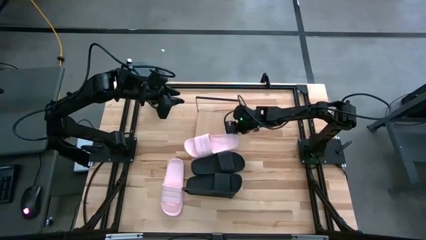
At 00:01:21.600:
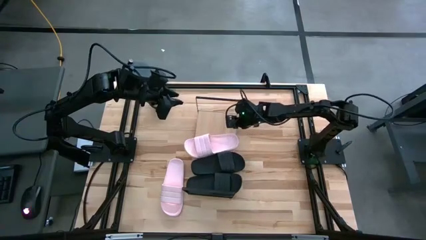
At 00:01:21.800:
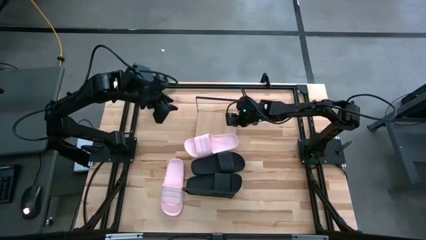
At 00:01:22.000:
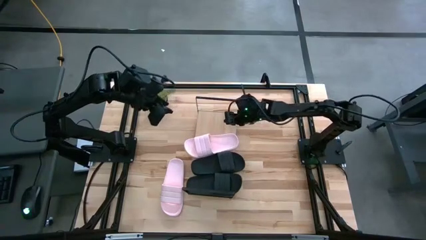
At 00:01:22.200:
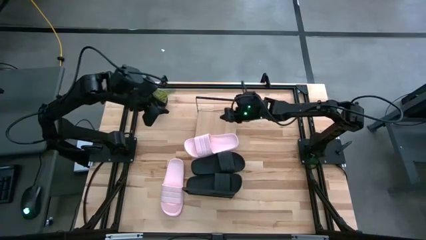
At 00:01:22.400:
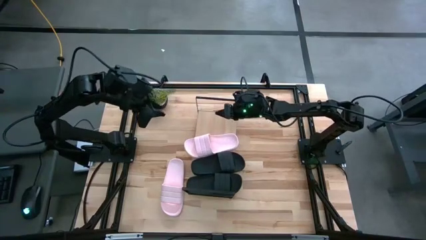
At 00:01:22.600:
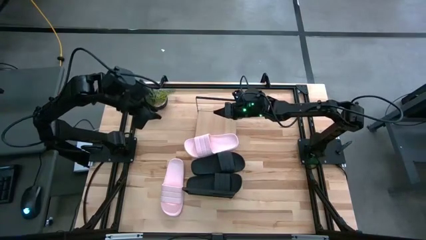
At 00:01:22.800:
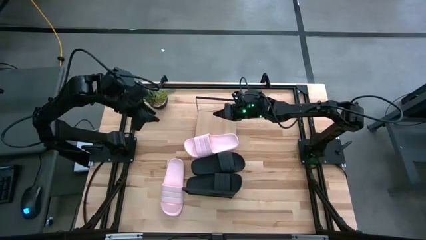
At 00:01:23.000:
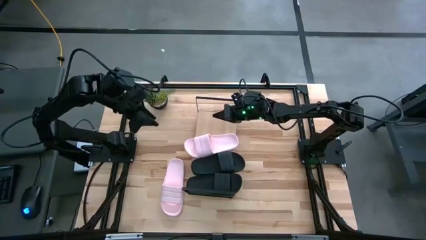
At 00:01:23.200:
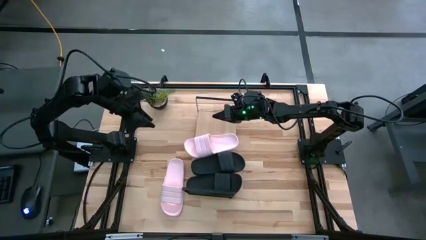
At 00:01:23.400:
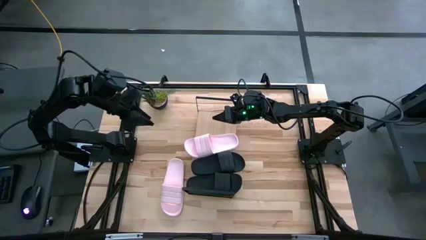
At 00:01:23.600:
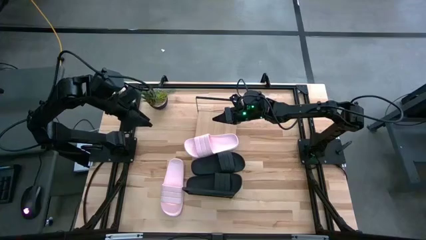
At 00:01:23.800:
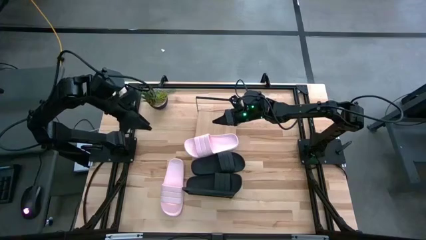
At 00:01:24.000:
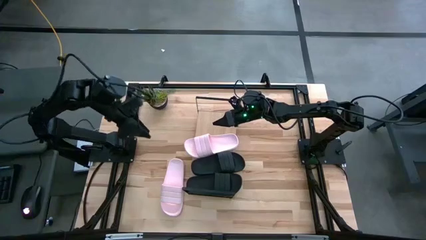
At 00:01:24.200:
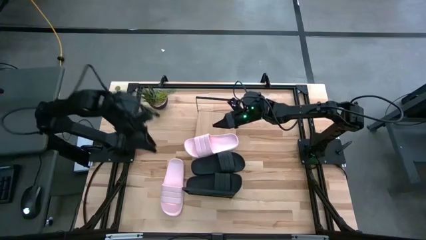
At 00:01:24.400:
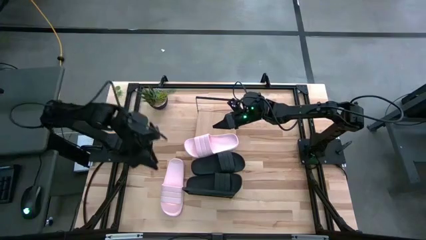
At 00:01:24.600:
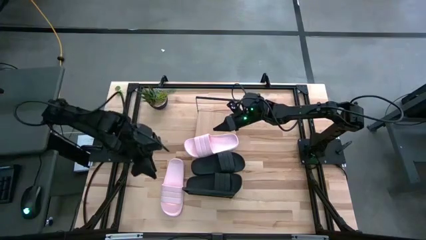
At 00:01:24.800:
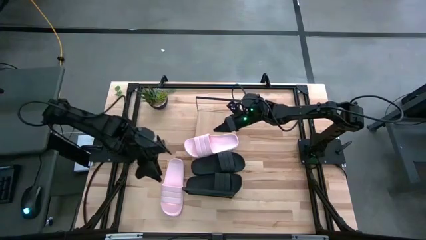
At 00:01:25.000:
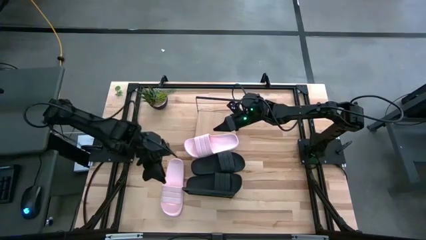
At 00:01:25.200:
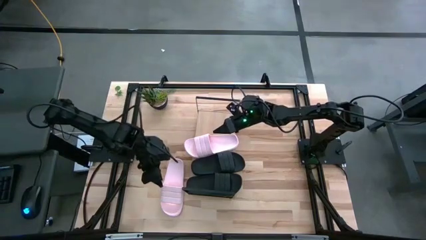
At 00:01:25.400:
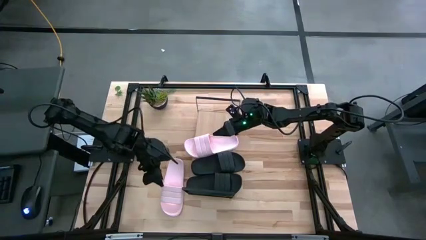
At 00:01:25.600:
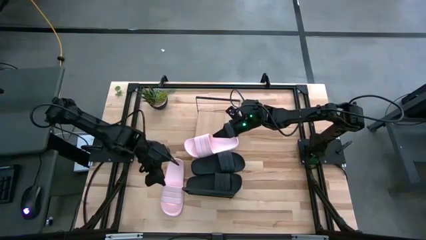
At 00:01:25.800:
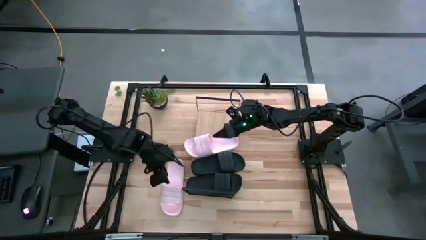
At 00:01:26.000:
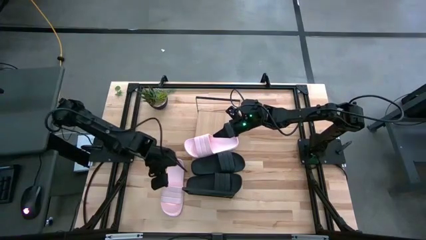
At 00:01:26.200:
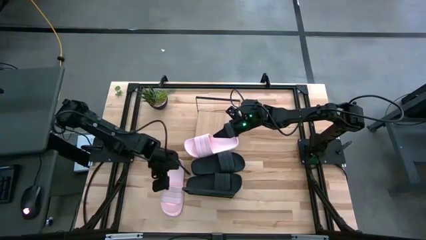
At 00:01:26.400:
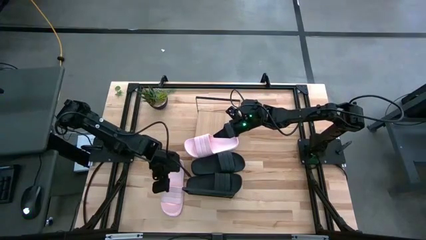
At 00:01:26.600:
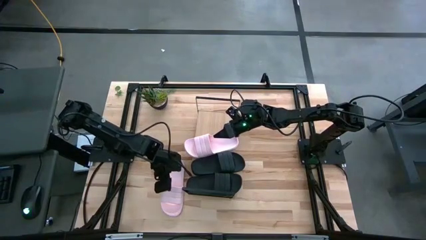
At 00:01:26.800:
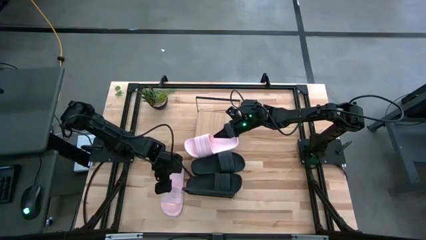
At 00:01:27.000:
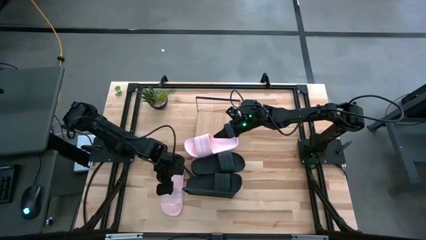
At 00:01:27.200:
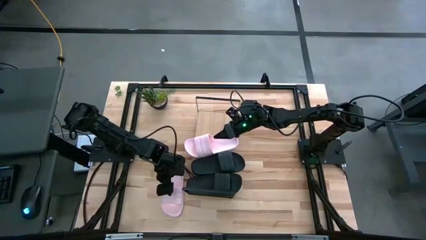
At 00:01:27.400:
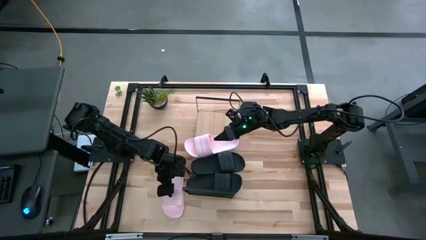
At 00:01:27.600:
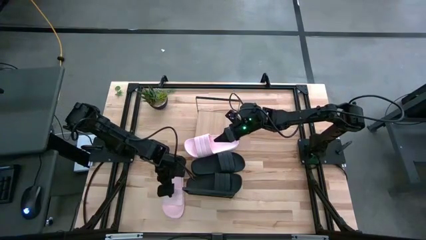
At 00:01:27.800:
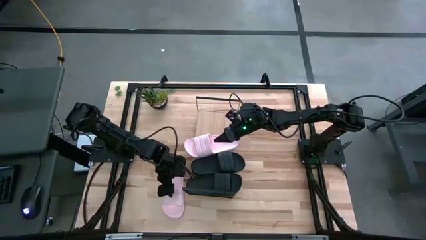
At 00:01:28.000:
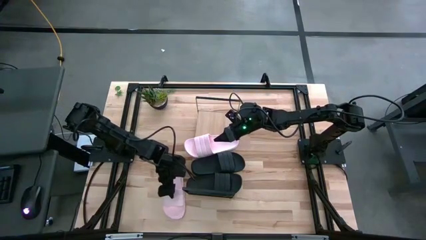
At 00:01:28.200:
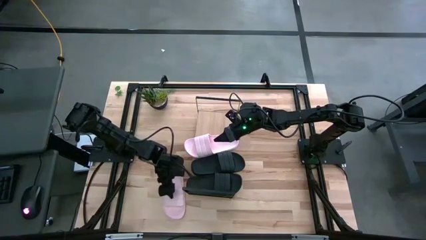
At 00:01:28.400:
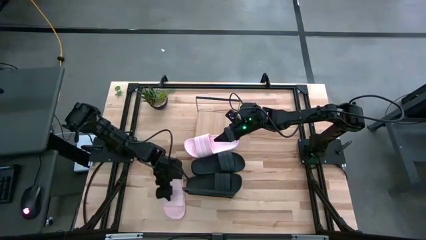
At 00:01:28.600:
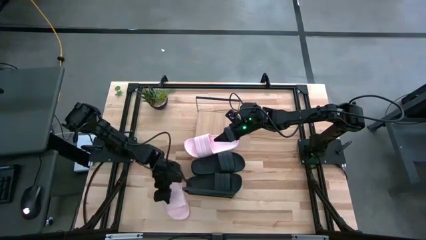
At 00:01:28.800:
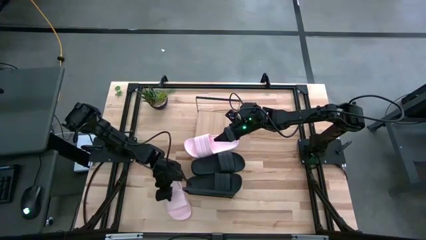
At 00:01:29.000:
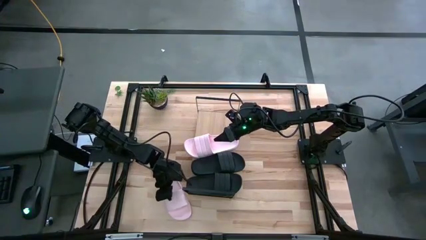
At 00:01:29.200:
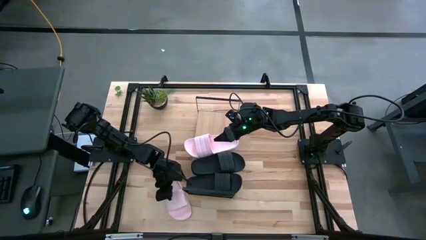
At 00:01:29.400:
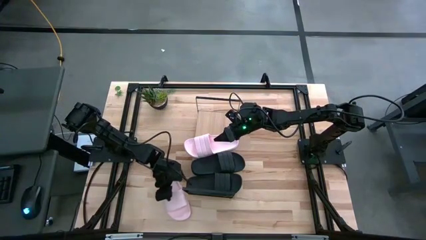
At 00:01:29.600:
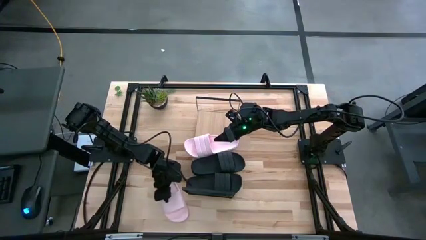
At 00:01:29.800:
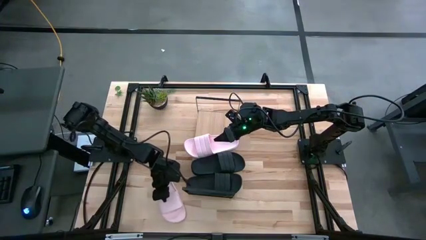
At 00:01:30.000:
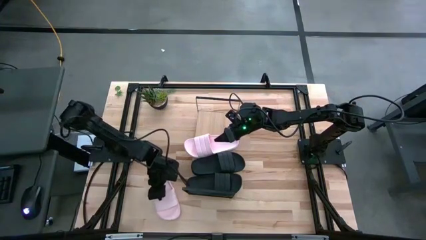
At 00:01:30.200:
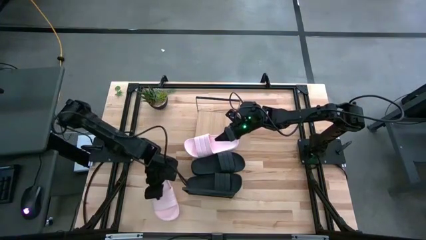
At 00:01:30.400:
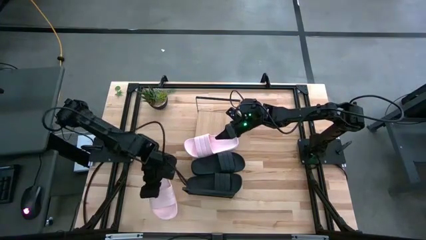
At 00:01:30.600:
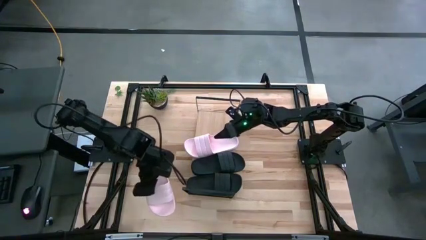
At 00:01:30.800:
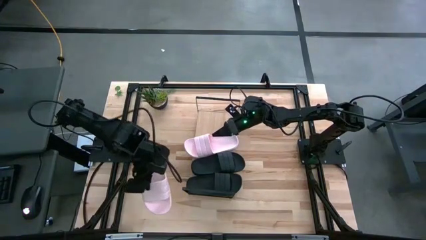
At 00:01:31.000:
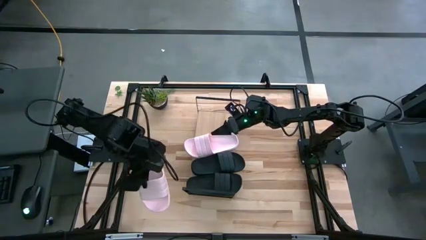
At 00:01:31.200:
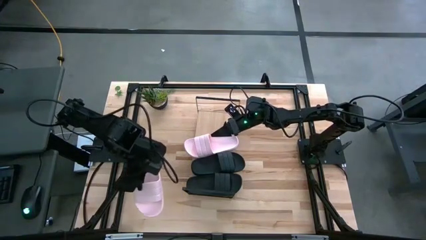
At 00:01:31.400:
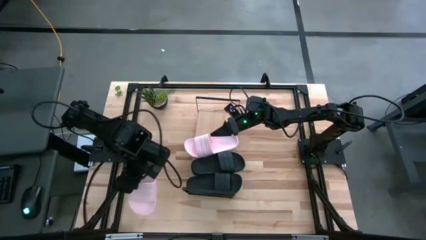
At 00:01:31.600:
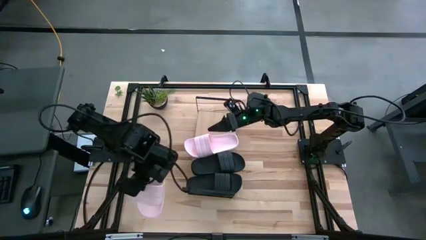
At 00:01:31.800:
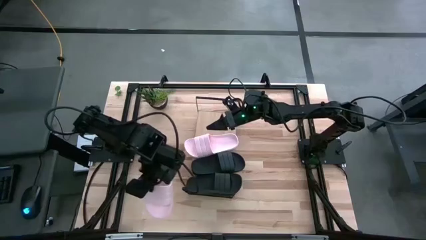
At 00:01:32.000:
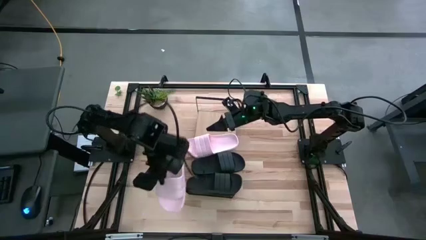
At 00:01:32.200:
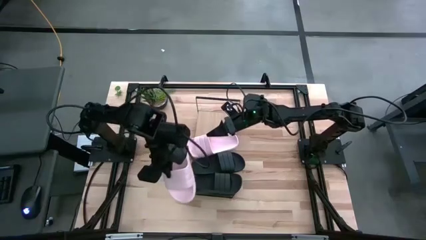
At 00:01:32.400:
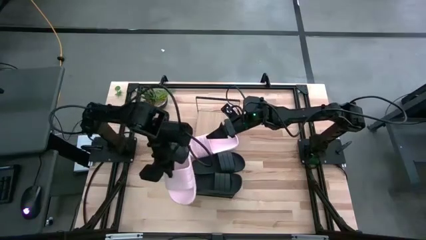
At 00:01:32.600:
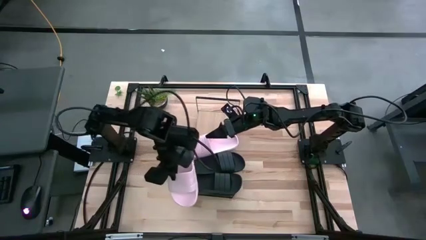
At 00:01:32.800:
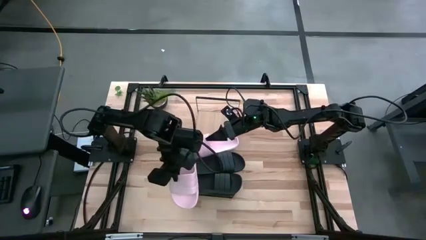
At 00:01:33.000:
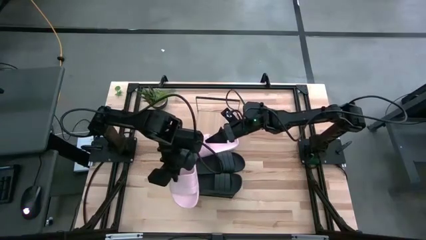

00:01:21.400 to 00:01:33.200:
Task: Pick and place slides into the shelf
Put the pink slide on the shelf

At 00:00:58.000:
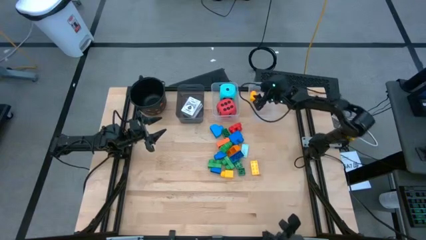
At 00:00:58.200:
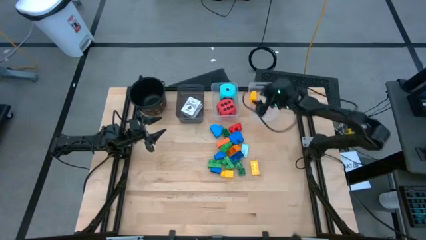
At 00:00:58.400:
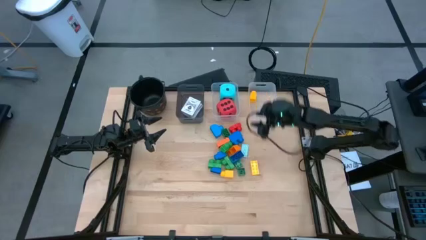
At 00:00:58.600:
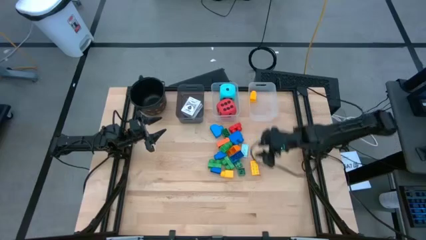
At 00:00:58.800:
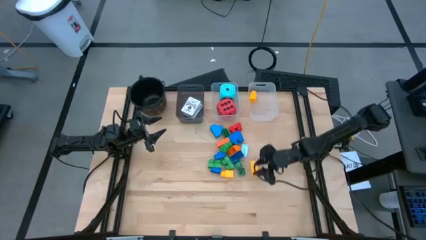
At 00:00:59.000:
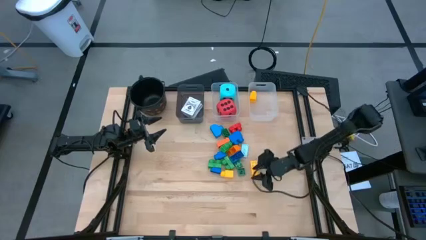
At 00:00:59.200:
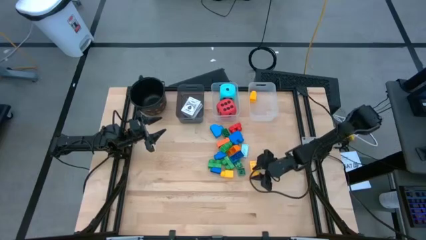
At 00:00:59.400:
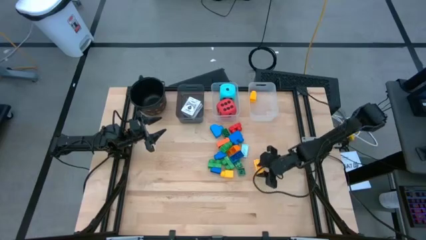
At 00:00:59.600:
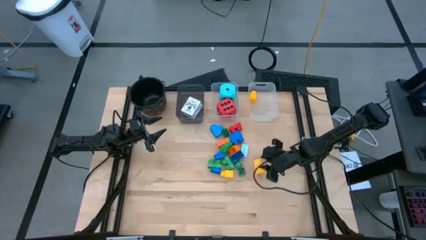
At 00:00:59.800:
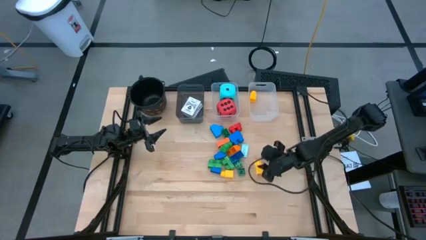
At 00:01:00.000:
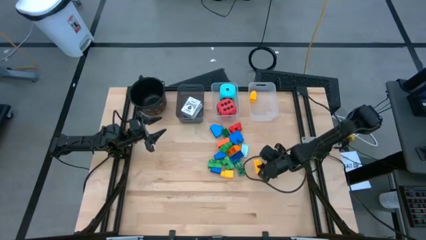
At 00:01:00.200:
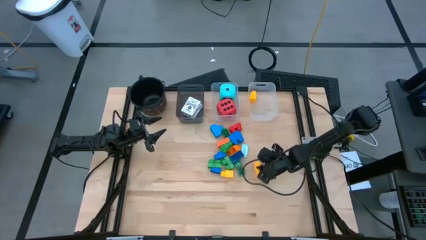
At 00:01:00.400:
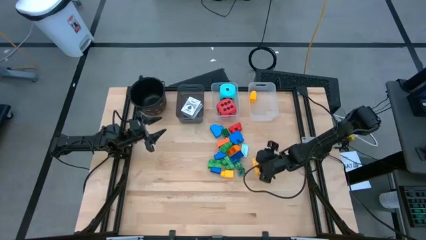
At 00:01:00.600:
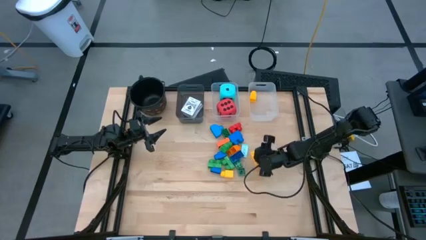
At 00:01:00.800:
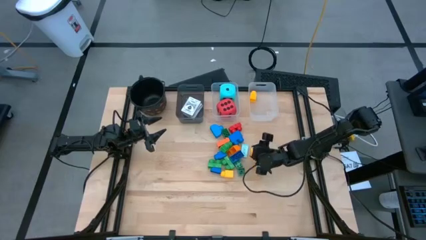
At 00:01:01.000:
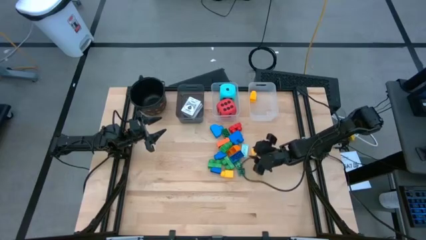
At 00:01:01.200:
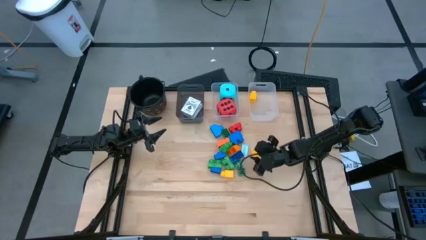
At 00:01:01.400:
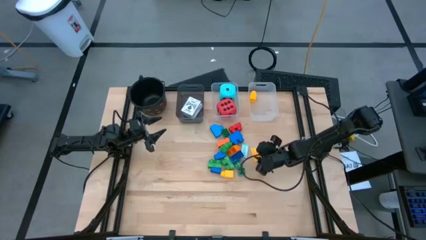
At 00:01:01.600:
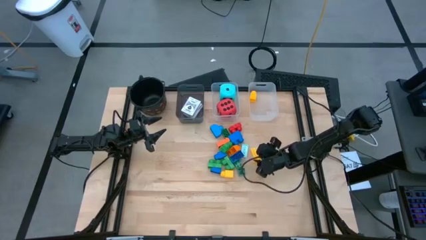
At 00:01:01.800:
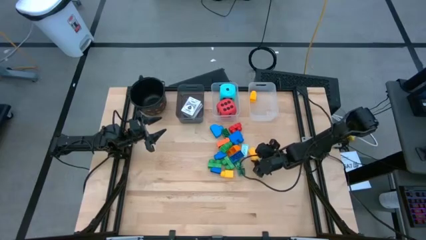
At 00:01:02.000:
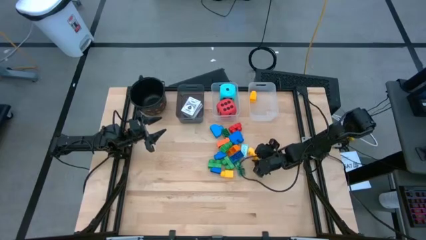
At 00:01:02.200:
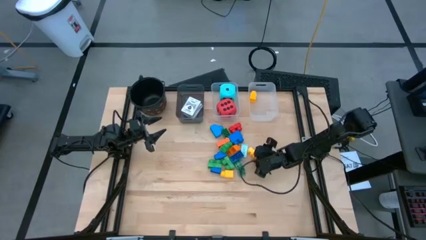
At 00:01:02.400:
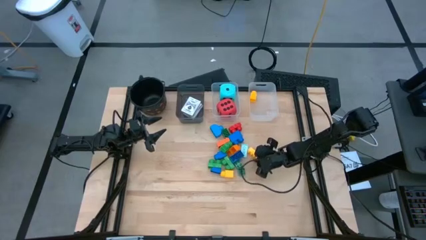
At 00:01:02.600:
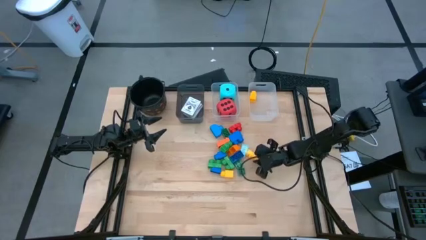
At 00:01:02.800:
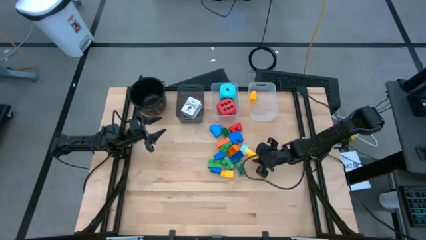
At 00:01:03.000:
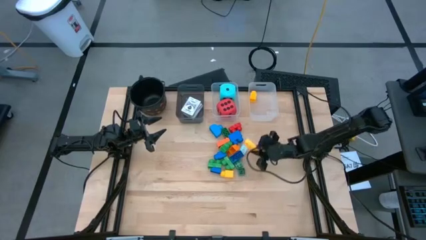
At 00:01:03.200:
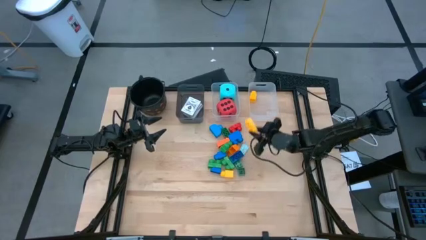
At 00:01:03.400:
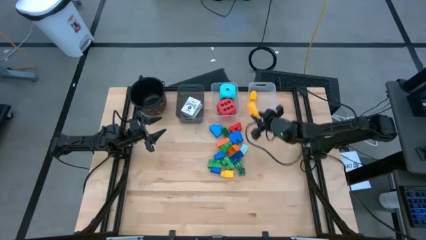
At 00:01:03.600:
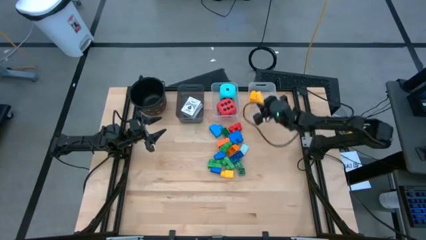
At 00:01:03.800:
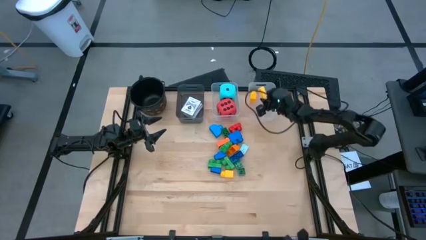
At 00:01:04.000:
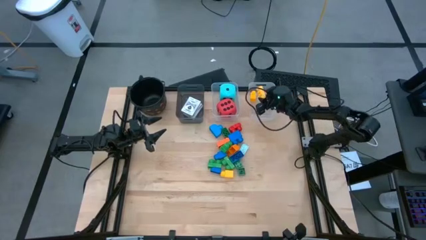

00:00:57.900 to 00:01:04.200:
Task: Pick & Place Toys
Put the yellow block into the right transparent bin
